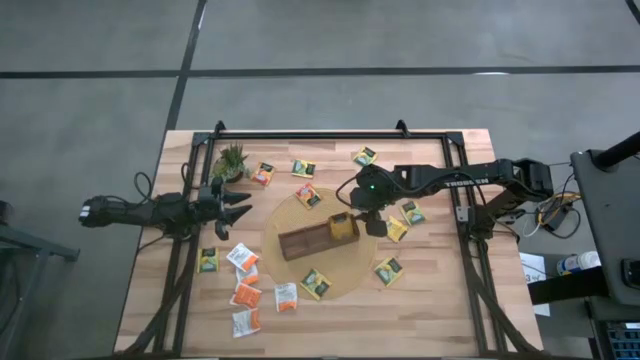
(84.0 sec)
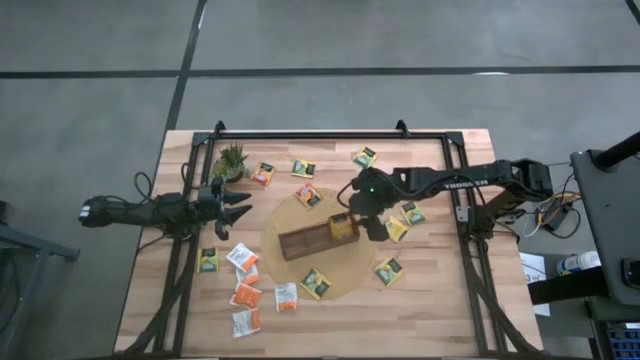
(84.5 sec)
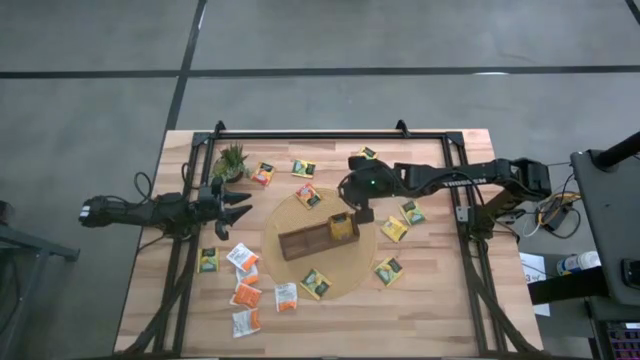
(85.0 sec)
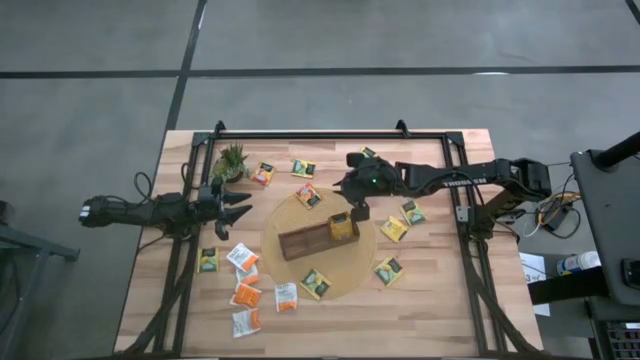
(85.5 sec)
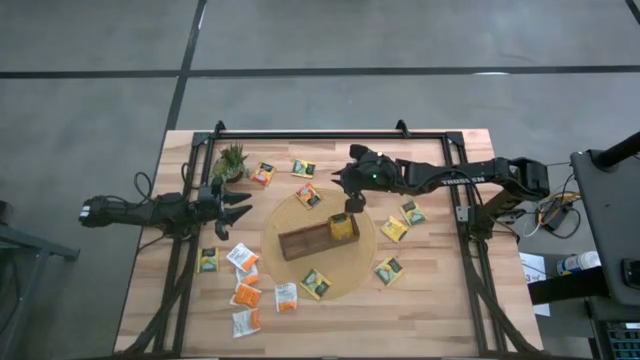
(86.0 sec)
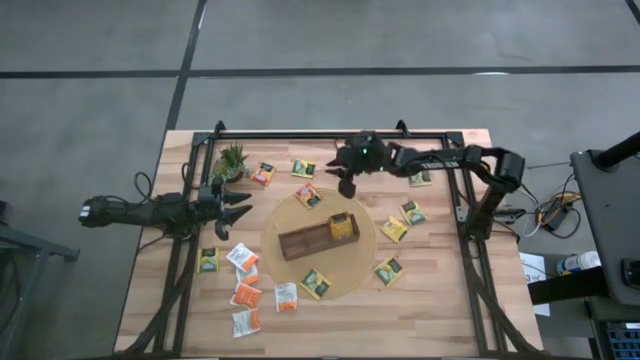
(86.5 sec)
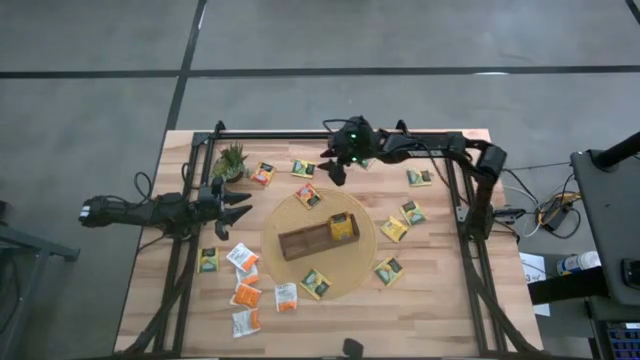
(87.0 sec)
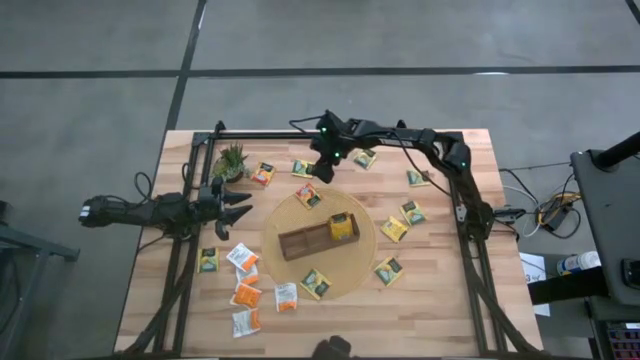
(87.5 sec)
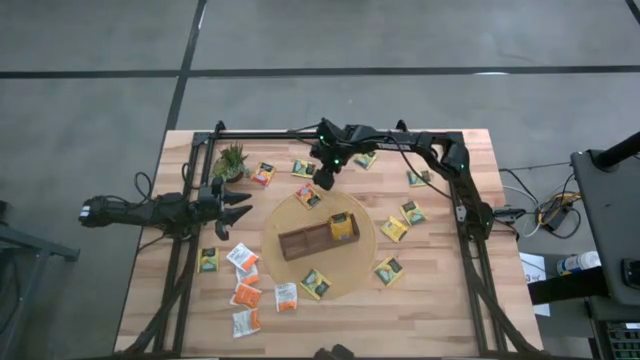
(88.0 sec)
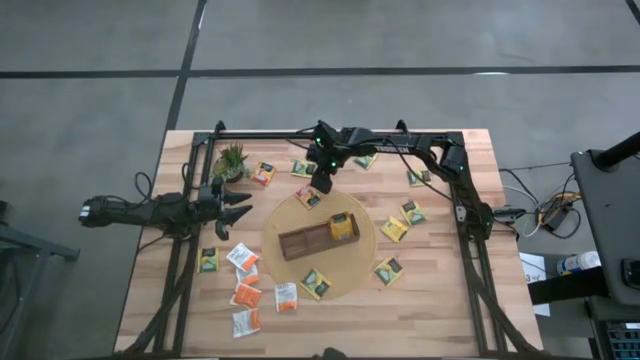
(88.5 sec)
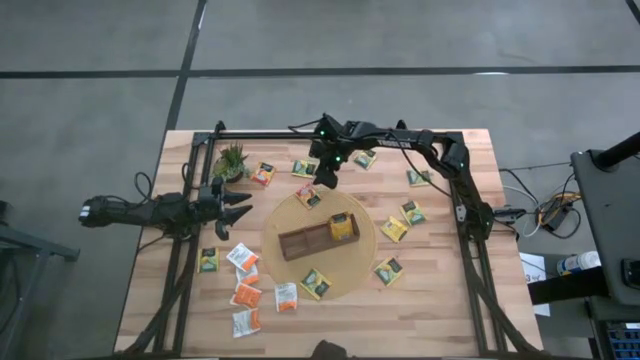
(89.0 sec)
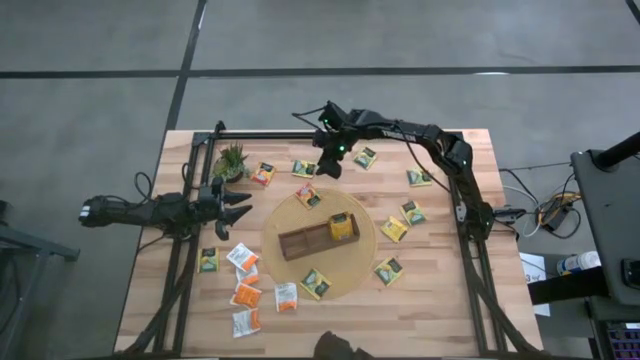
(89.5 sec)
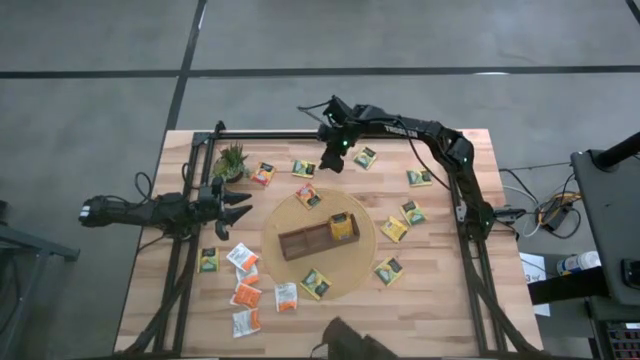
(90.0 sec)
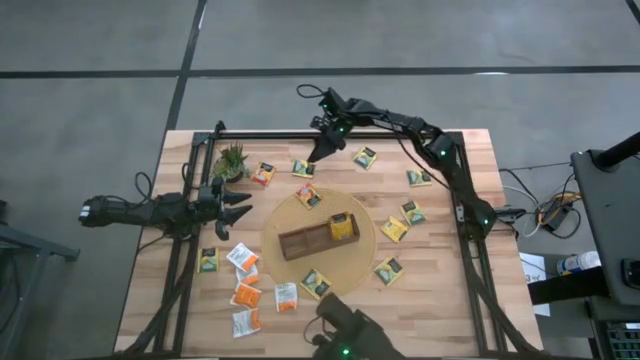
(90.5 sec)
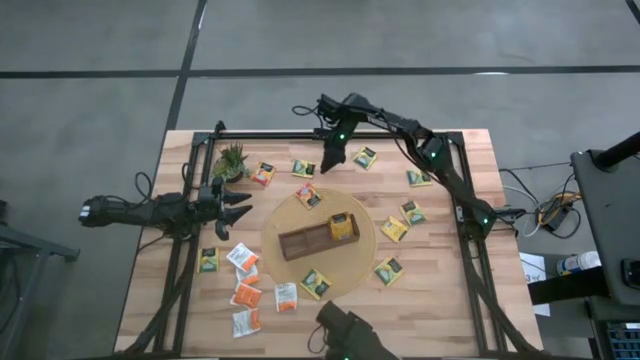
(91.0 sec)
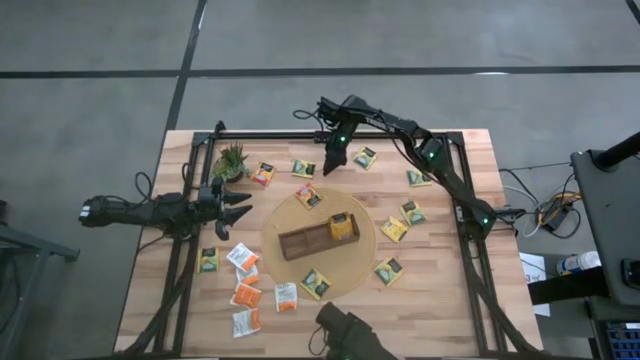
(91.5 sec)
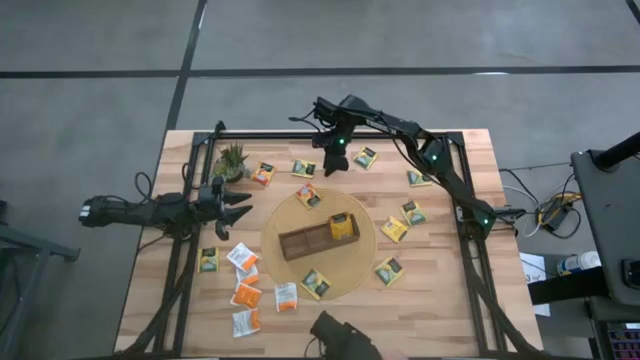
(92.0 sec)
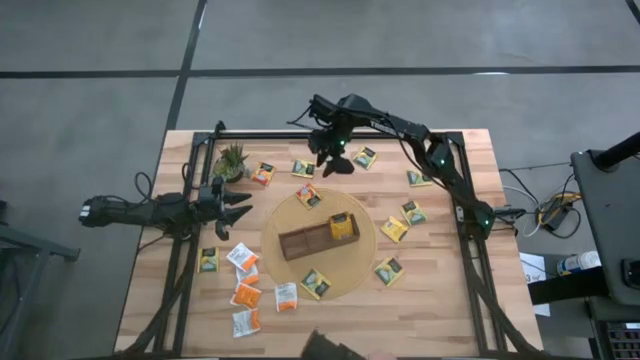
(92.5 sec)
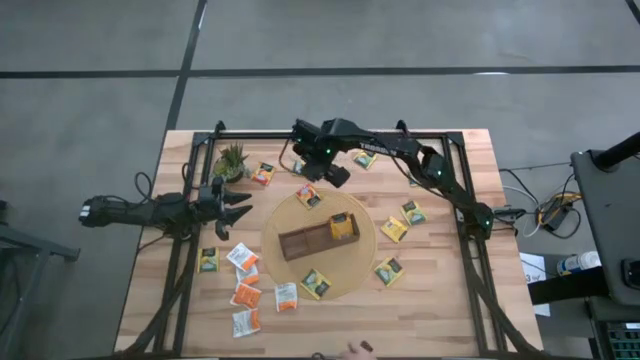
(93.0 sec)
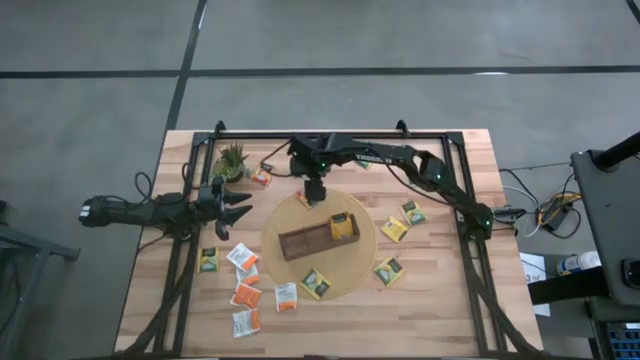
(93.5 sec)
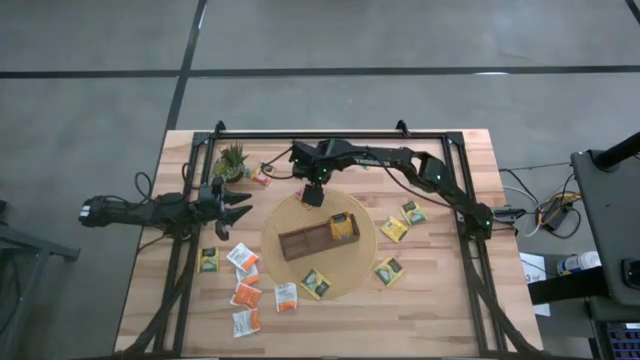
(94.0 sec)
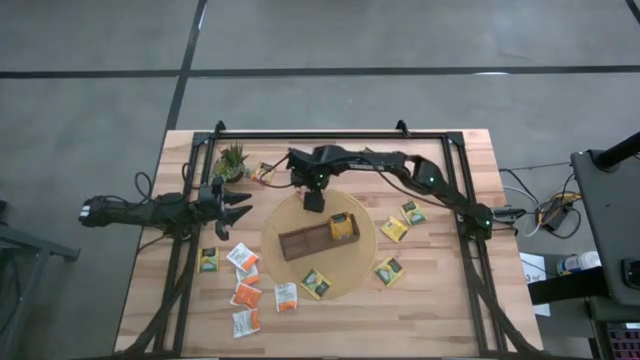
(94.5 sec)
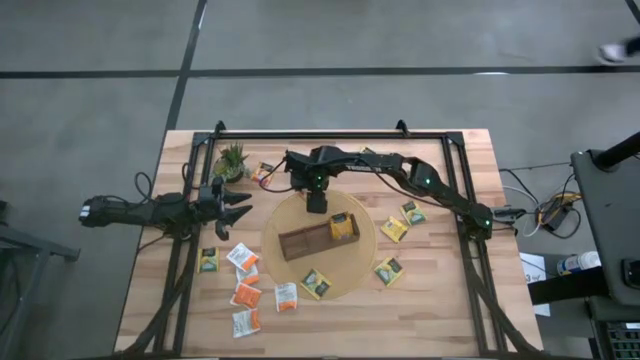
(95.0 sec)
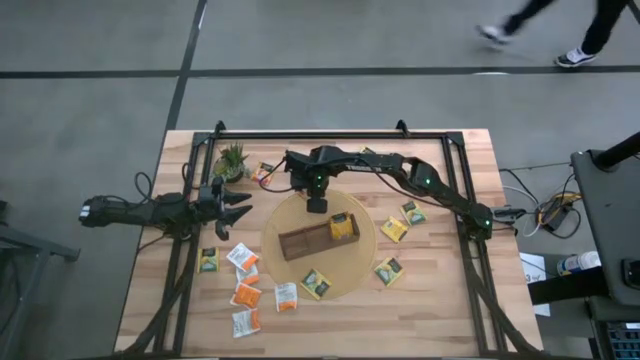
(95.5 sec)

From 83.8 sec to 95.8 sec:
Task: Pick & Place Tea
Put the orange tea bag into the right section of the wooden organizer

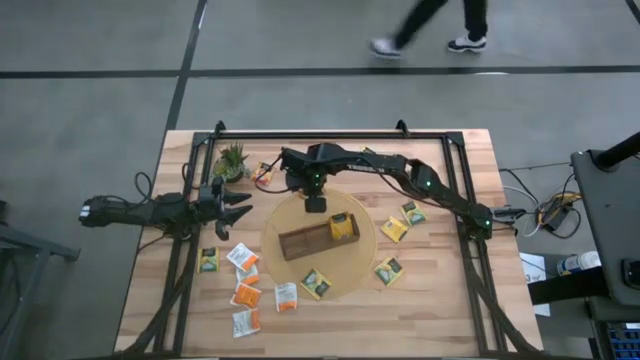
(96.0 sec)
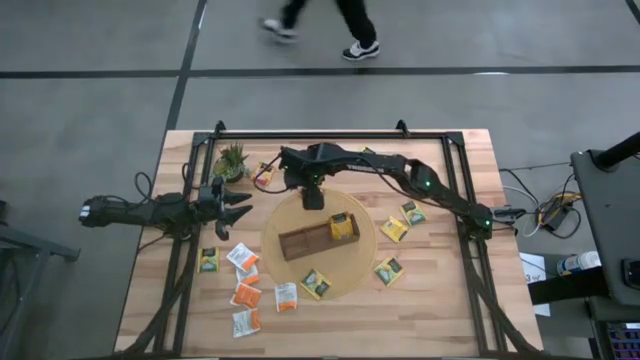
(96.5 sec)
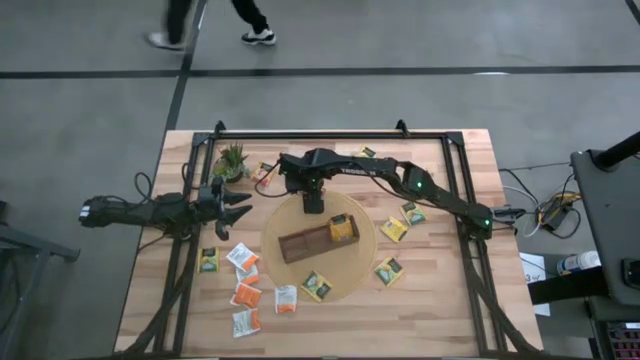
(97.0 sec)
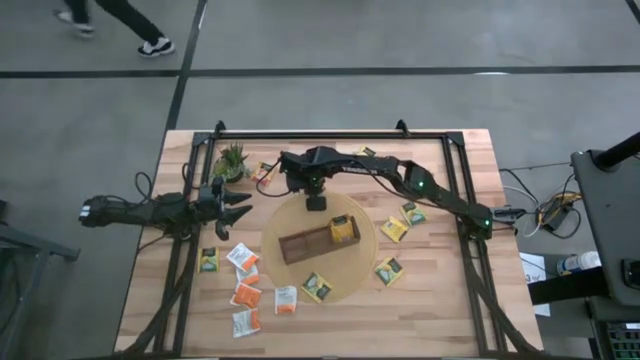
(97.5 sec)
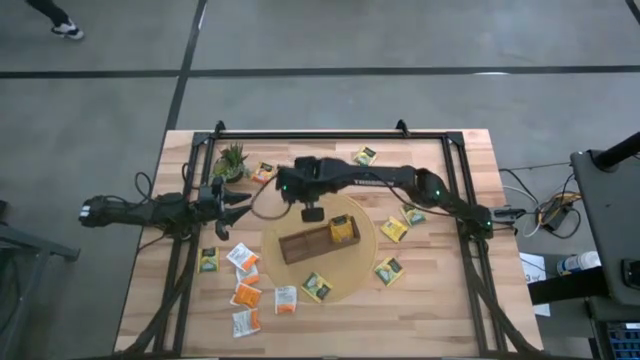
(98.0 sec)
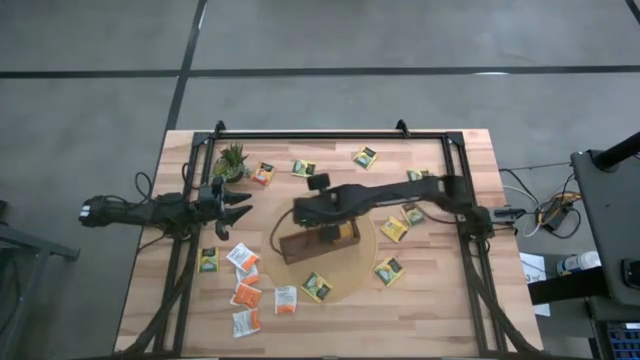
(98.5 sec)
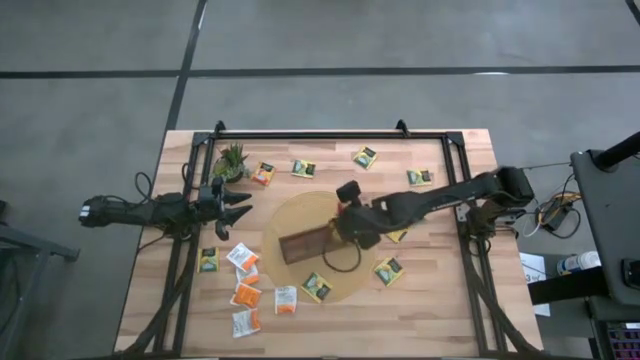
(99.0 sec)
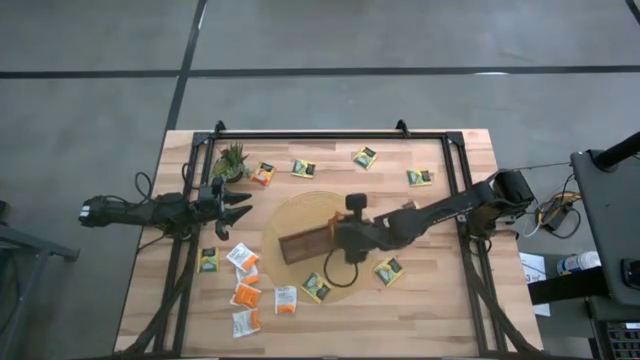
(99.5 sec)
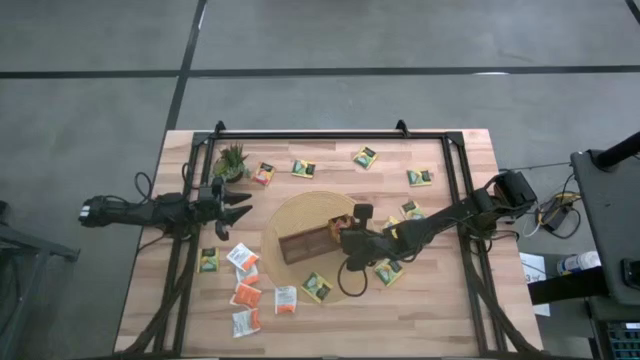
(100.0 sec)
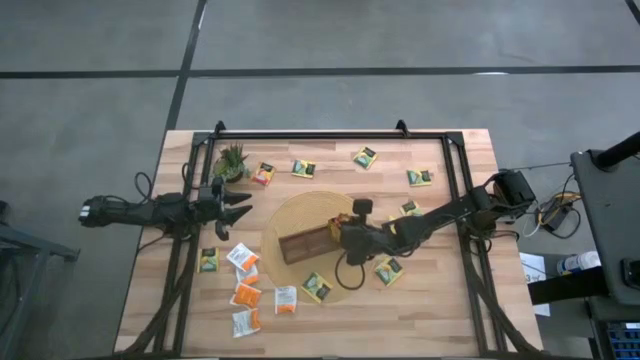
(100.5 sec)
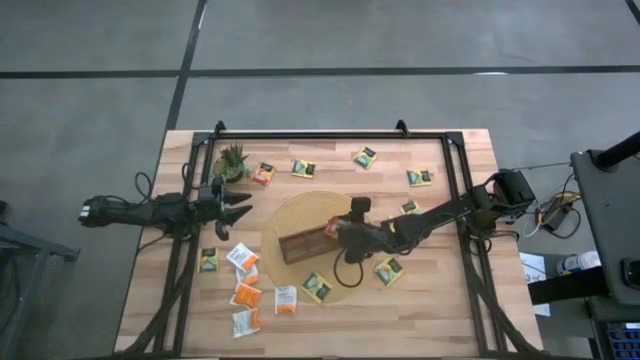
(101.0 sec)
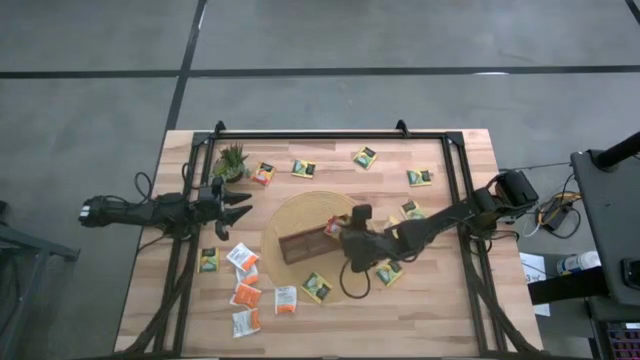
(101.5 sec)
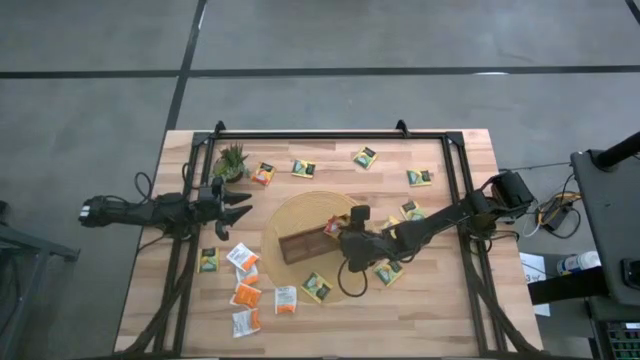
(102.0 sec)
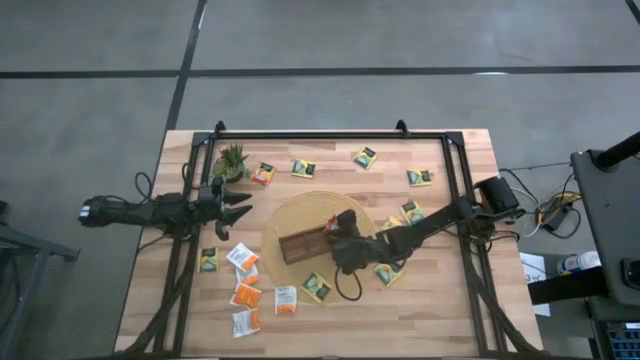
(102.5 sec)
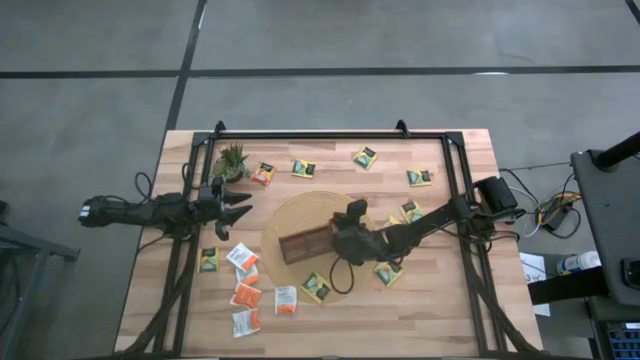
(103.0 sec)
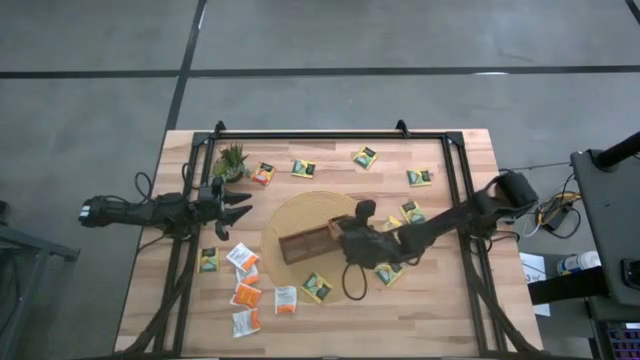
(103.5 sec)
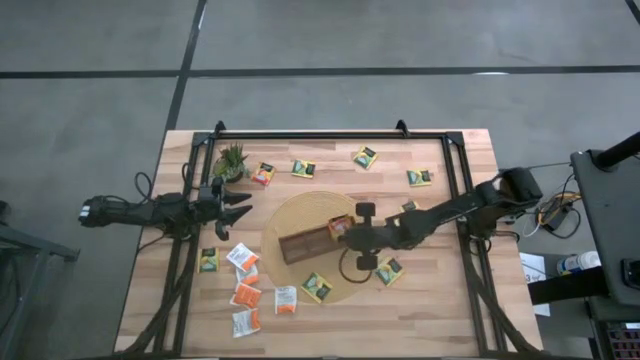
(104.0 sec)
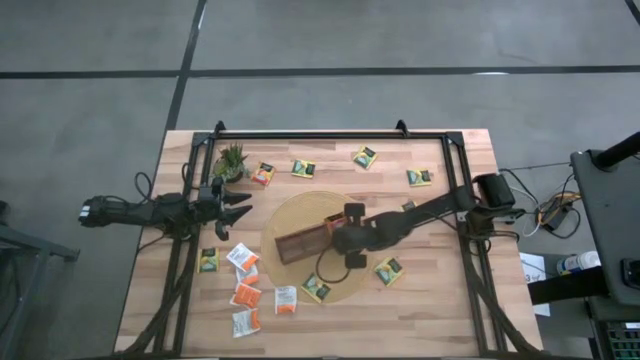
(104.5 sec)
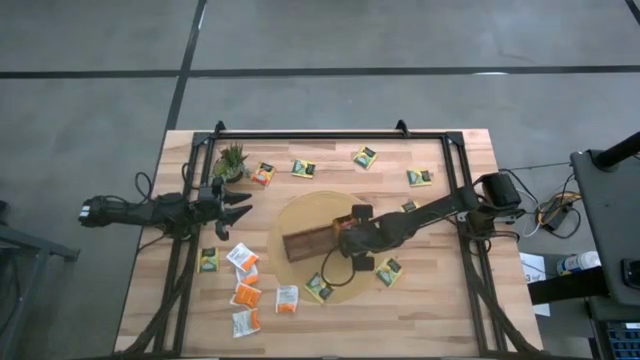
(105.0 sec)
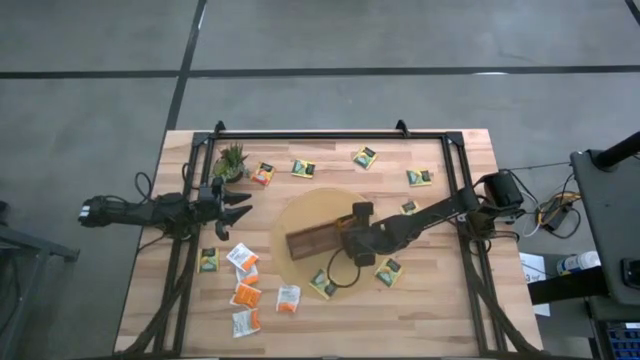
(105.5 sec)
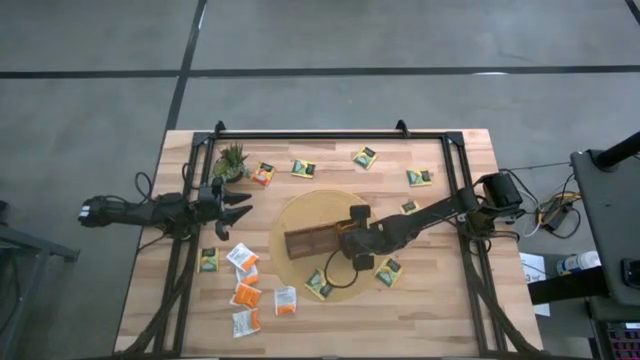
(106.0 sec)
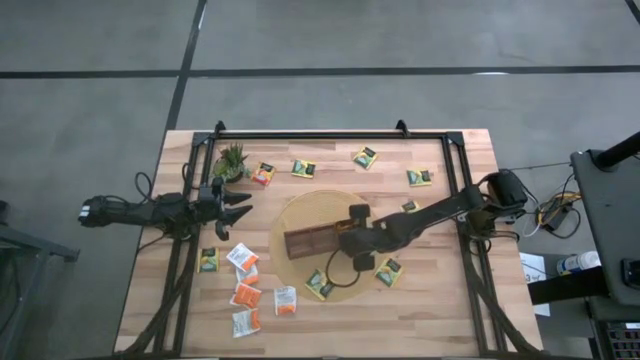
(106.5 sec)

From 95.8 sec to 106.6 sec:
Put the orange tea bag into the right section of the wooden organizer
